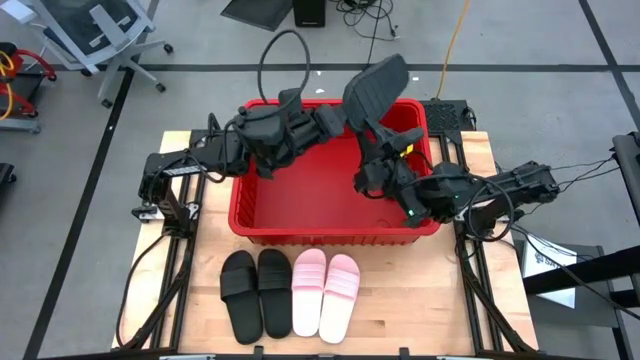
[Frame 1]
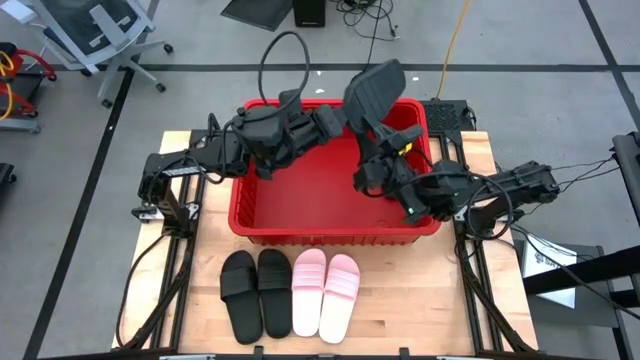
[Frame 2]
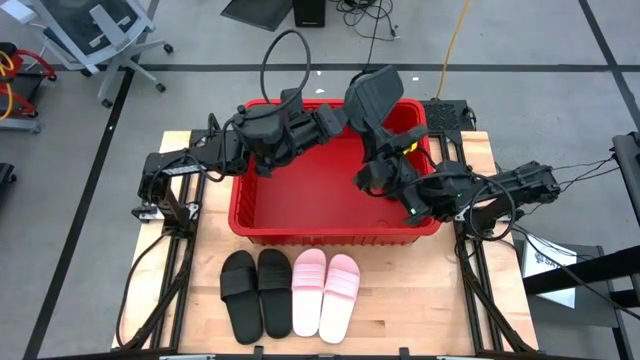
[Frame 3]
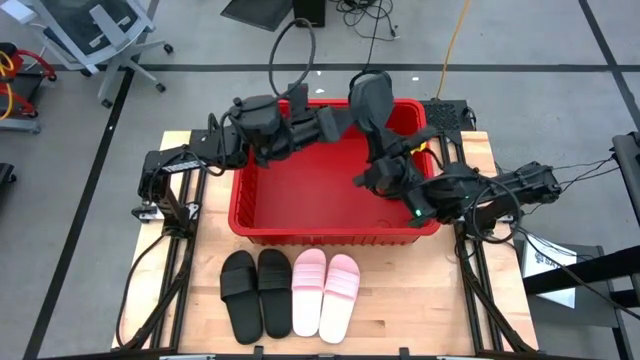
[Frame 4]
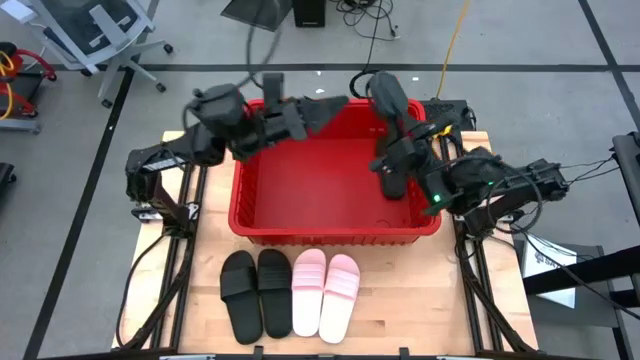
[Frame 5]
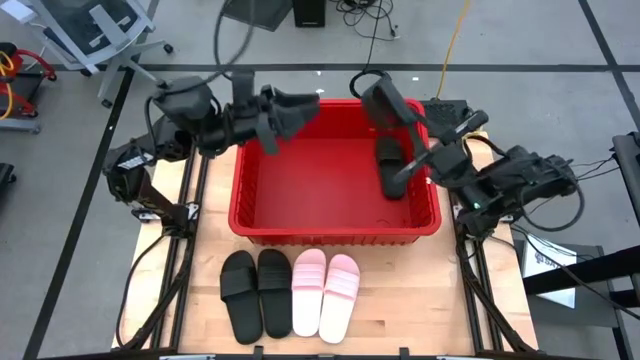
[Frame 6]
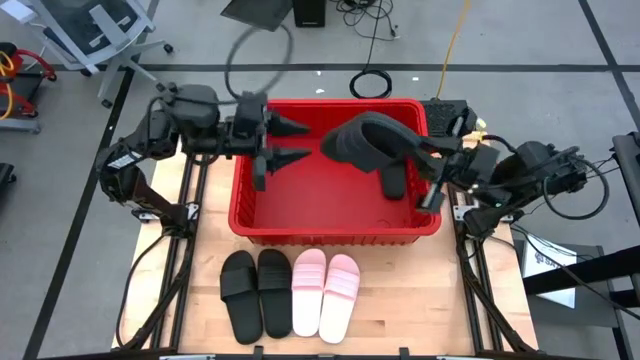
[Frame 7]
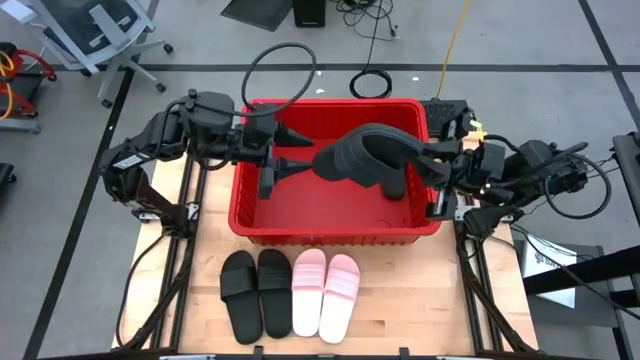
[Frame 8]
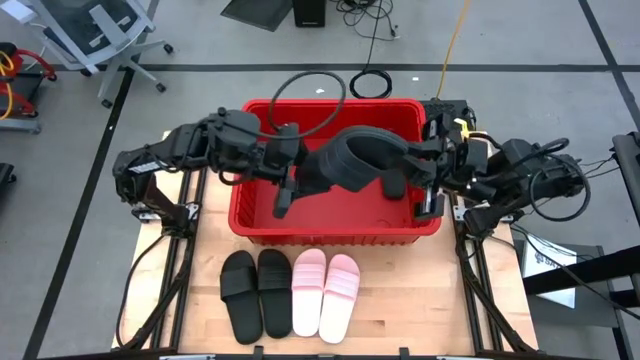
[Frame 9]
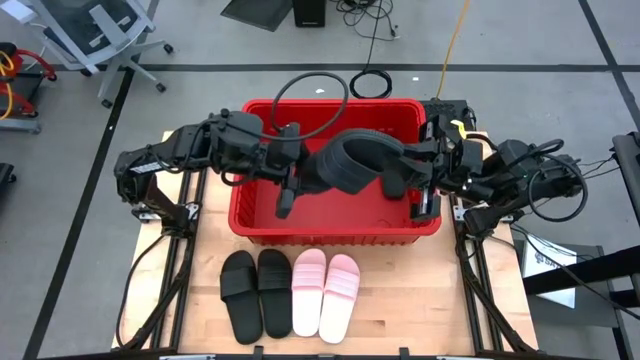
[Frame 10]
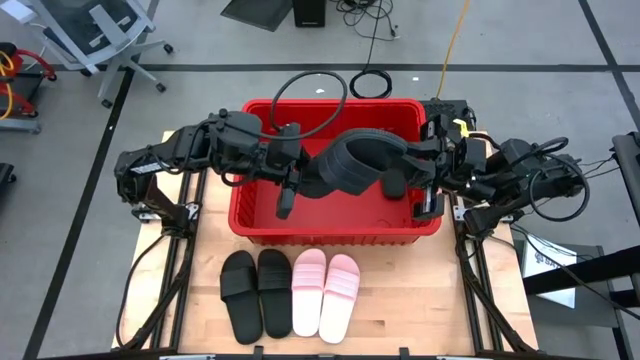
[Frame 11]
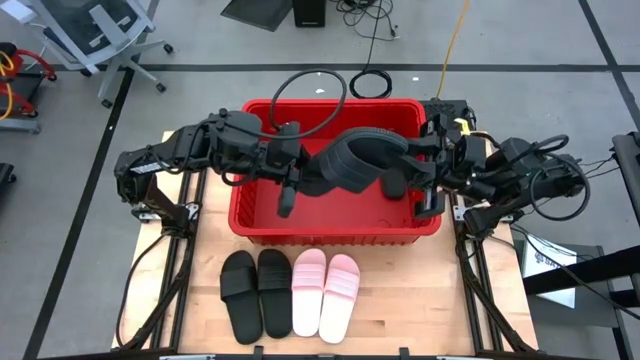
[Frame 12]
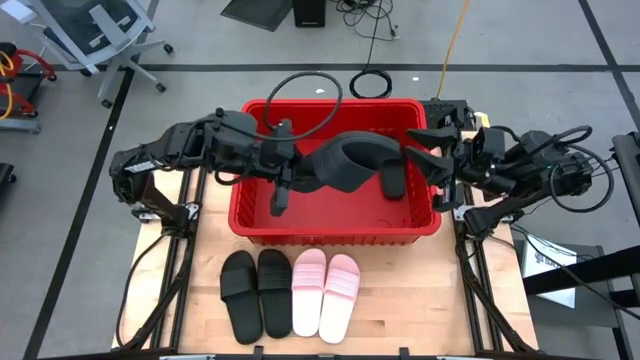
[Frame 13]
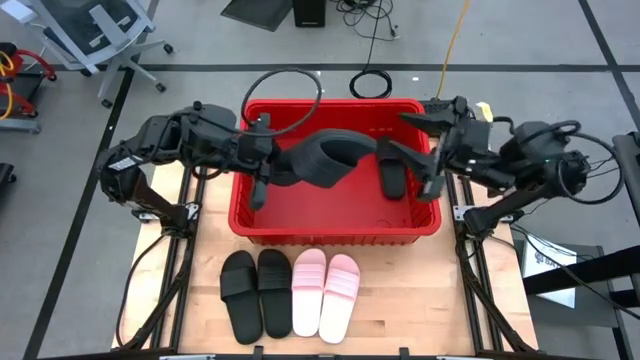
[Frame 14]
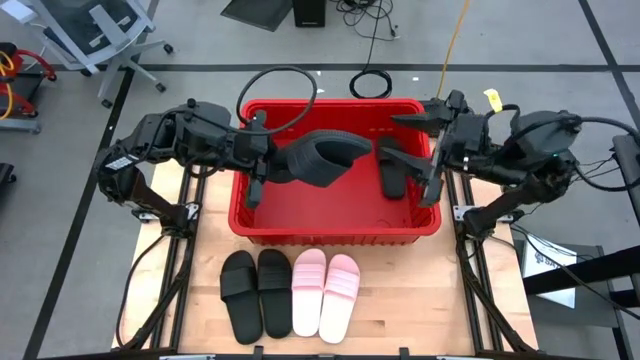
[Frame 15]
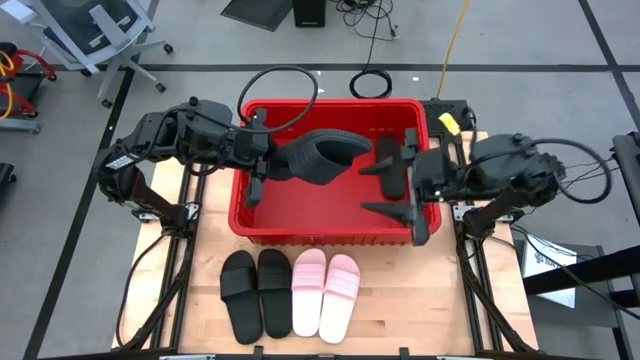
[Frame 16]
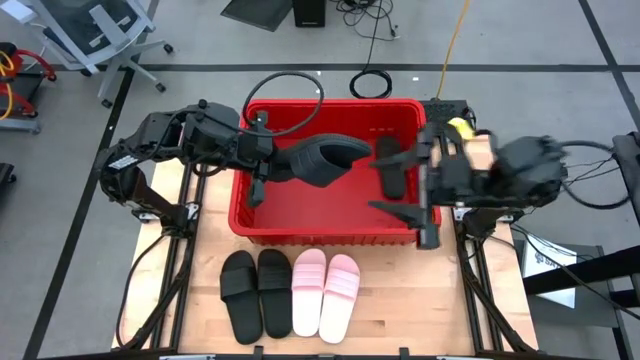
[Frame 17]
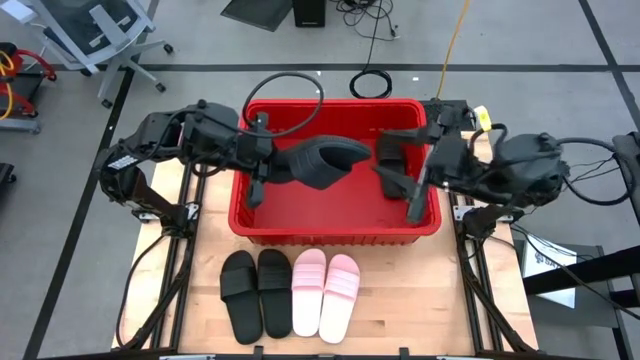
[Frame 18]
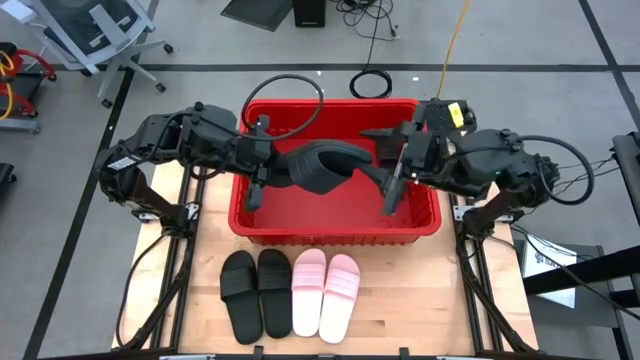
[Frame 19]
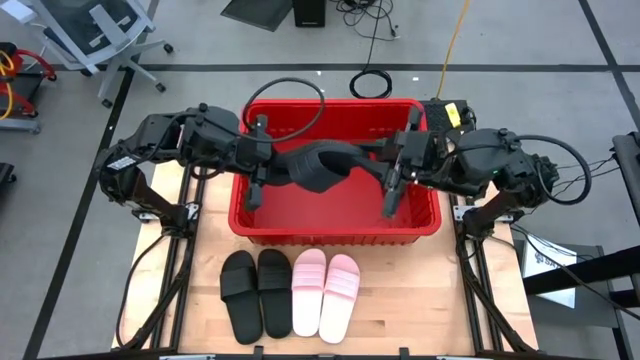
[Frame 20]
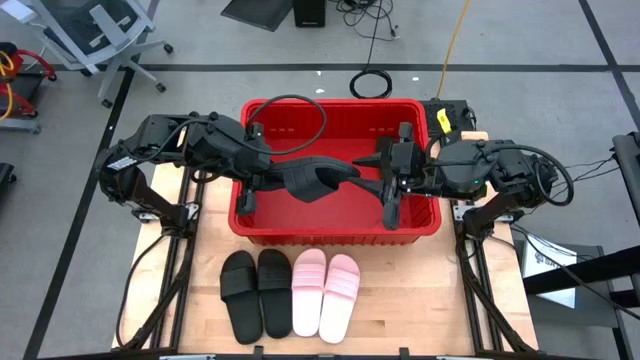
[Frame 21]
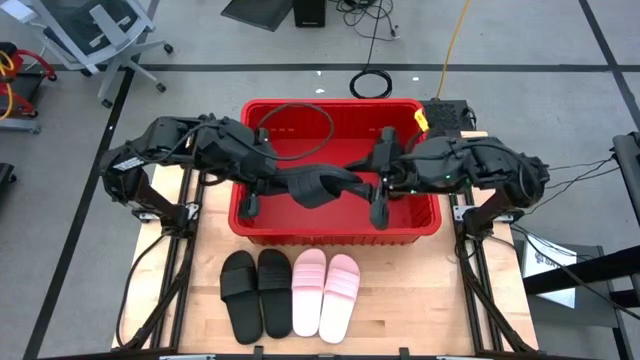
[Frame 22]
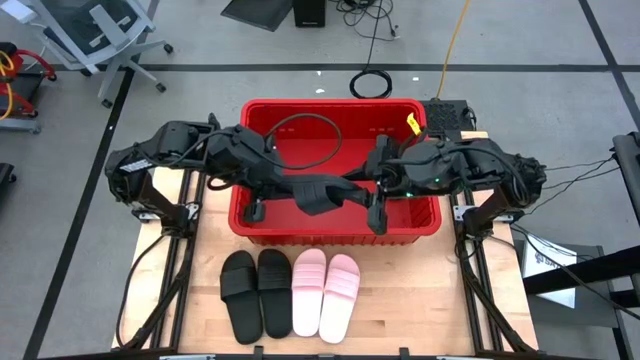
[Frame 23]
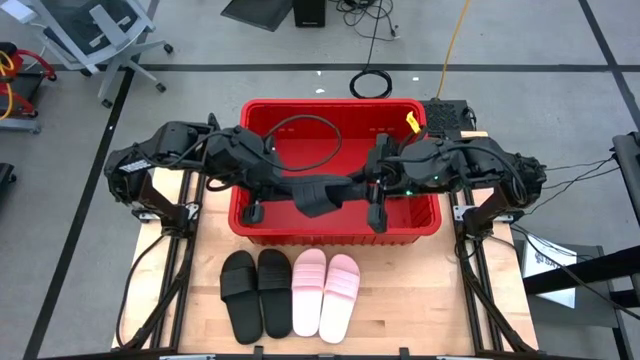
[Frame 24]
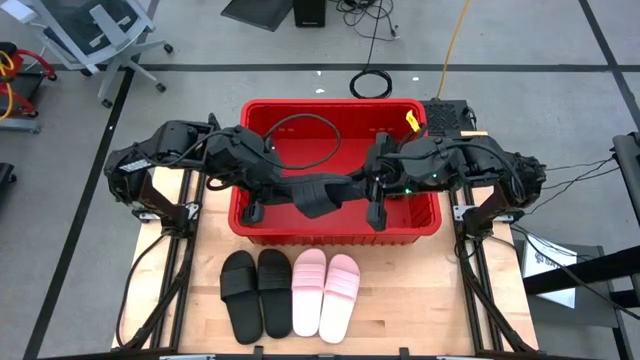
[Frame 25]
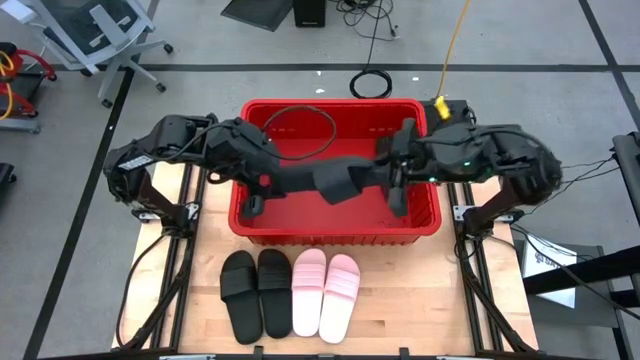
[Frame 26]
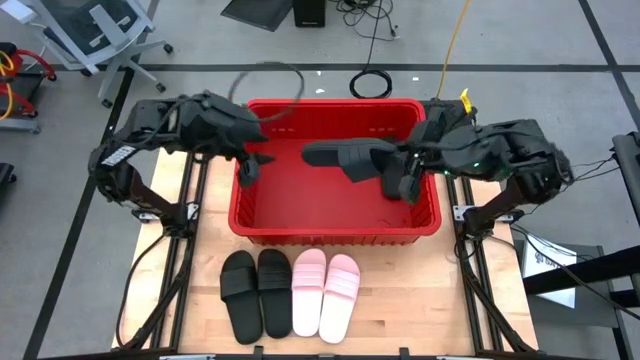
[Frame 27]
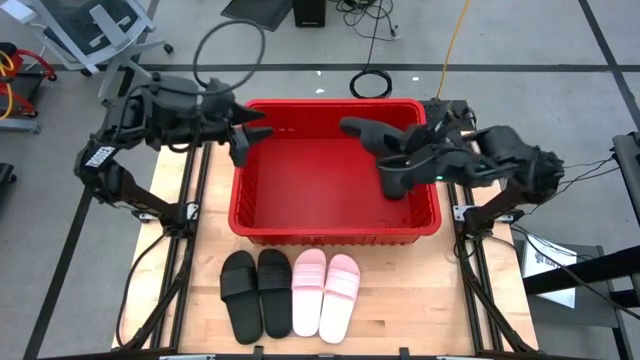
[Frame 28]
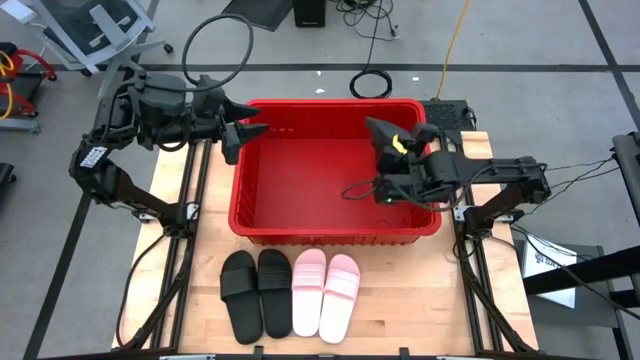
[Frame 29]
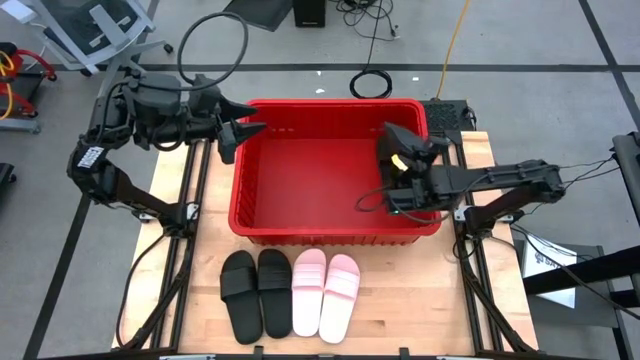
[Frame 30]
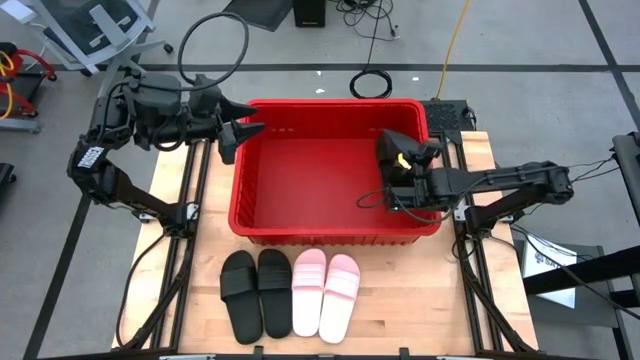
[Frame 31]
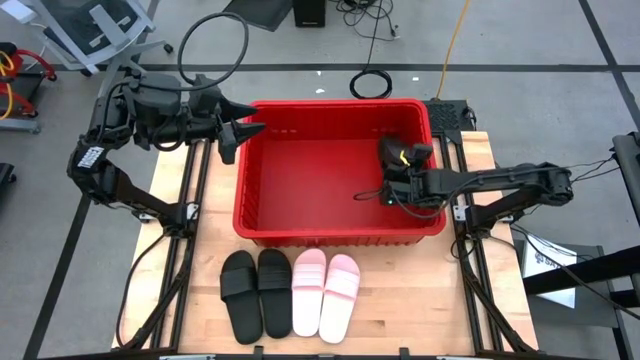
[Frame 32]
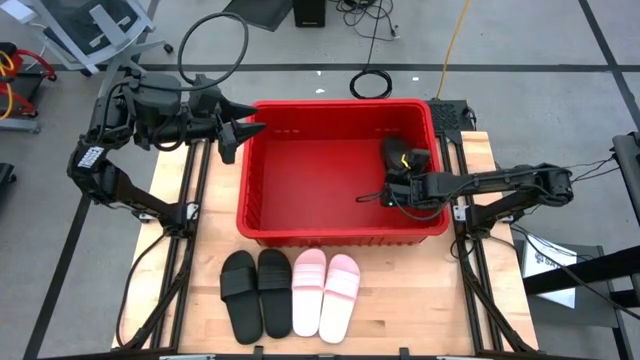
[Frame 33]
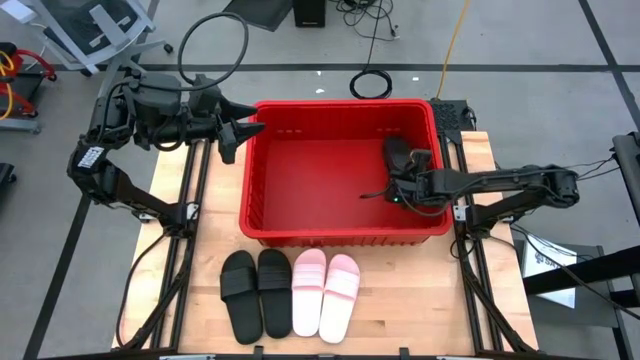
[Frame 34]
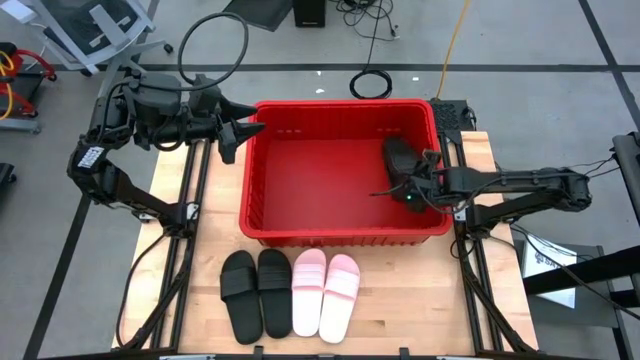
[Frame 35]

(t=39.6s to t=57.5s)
Task: Pick and place slides into bin
Put the black slide into the red container

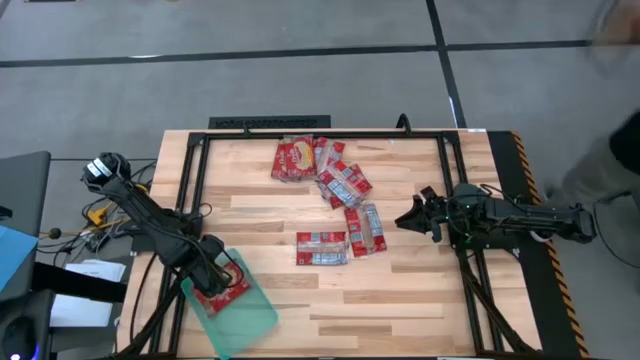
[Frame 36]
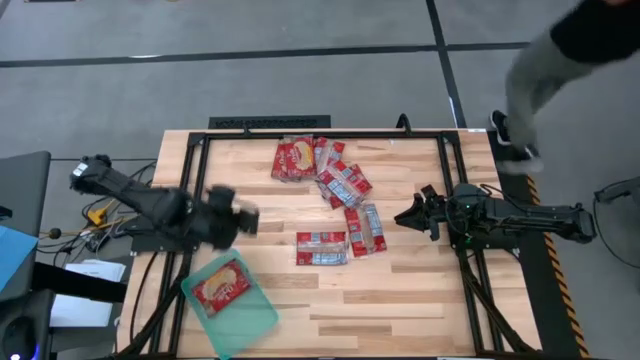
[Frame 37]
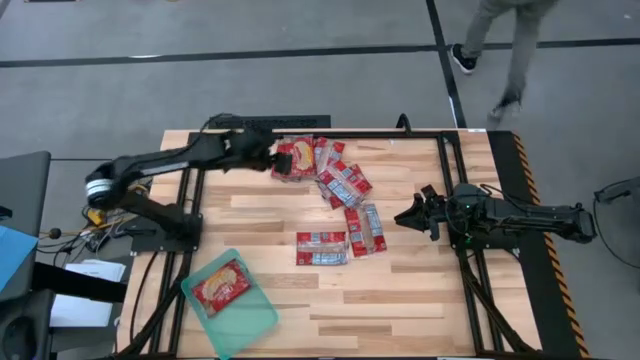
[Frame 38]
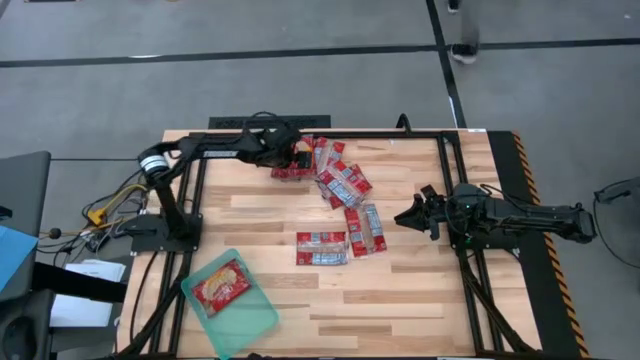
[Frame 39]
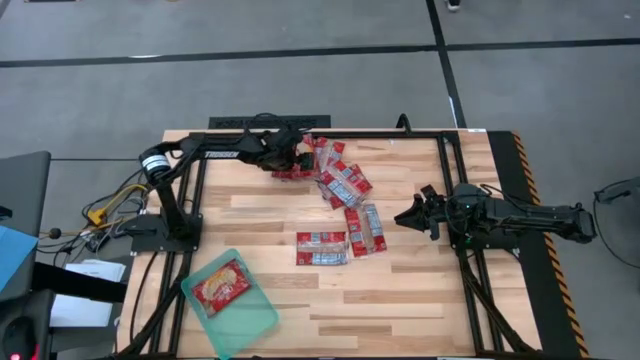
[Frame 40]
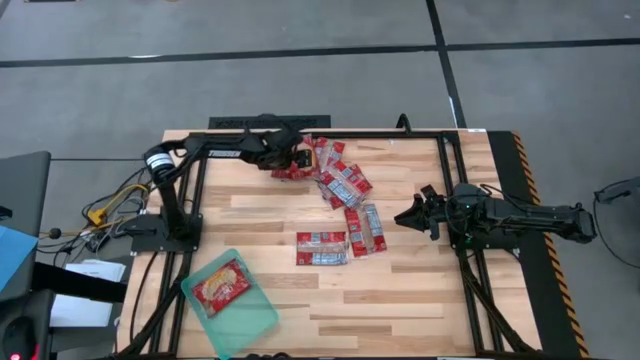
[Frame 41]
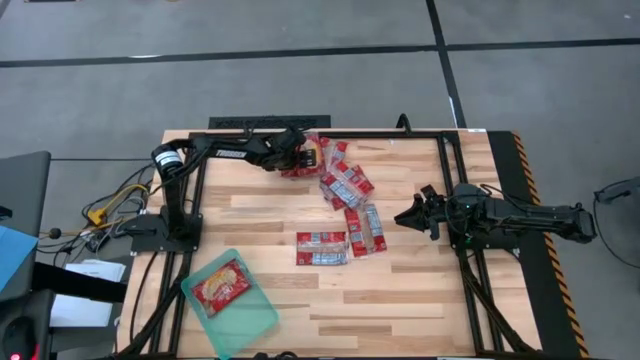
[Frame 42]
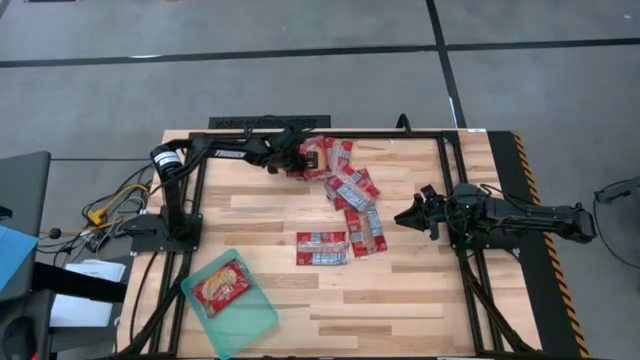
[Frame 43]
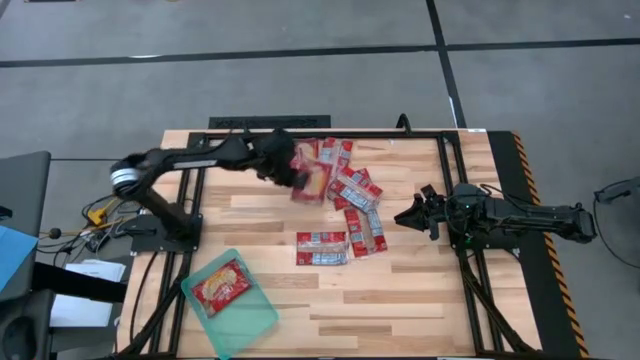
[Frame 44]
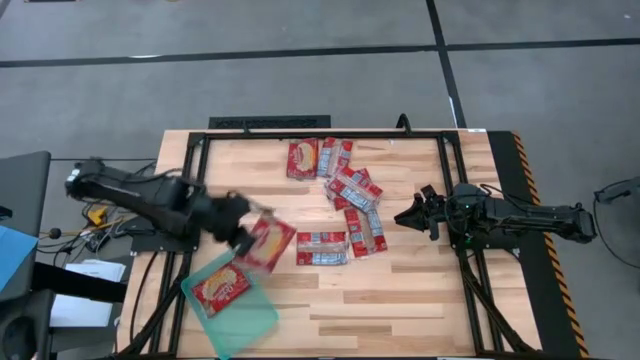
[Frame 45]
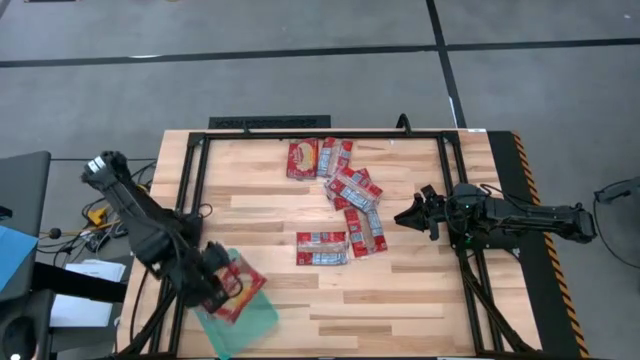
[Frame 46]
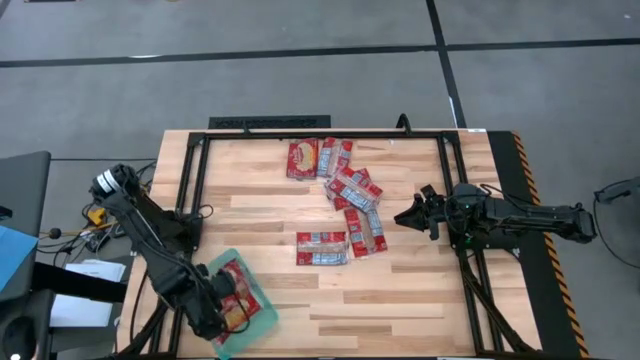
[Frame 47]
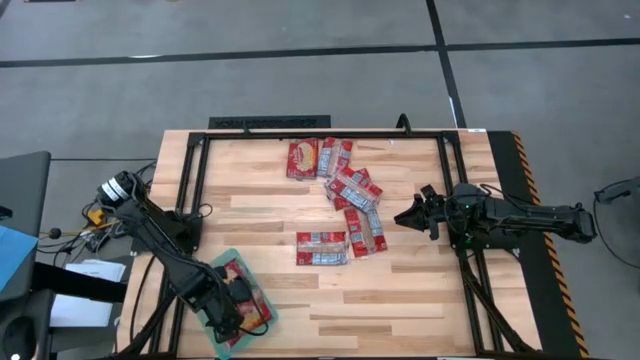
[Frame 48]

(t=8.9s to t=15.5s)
Task: Sort popcorn bags into baskets
Put the red popcorn bag into the green bin
